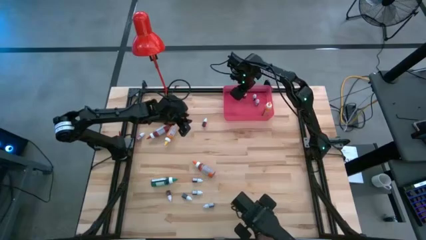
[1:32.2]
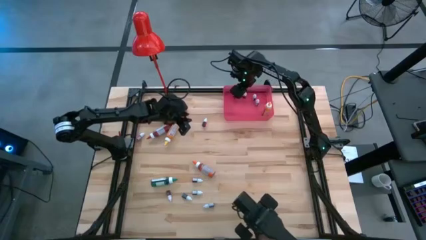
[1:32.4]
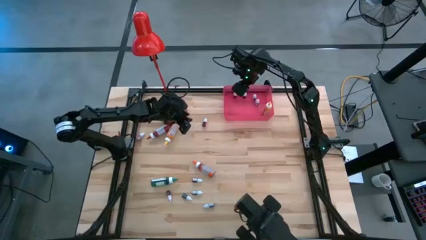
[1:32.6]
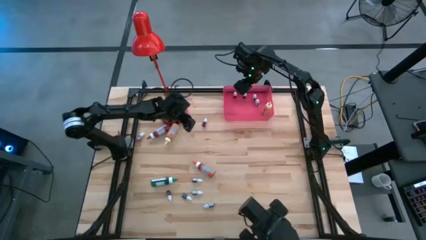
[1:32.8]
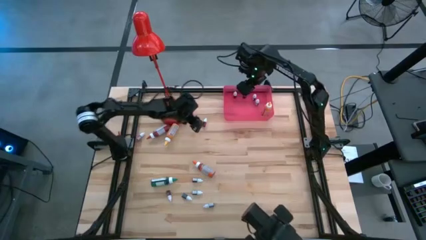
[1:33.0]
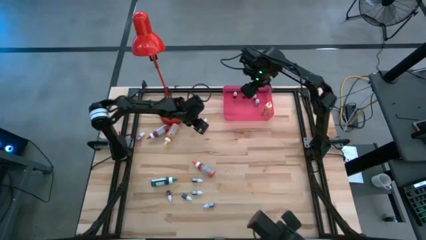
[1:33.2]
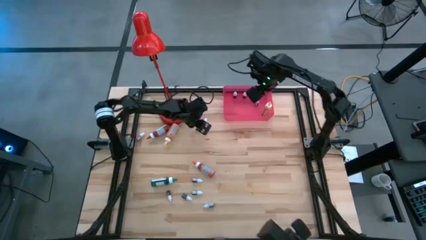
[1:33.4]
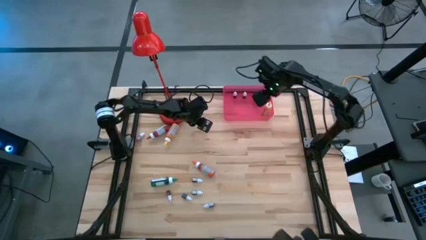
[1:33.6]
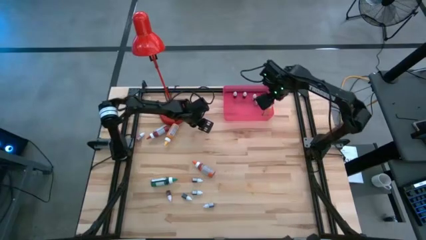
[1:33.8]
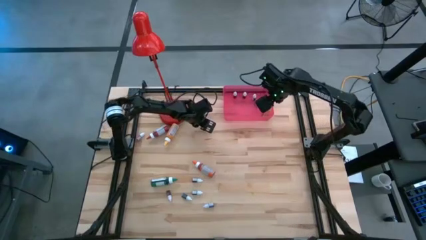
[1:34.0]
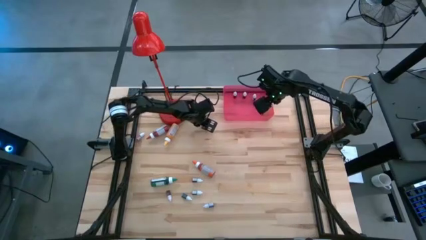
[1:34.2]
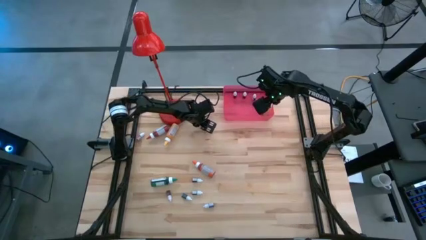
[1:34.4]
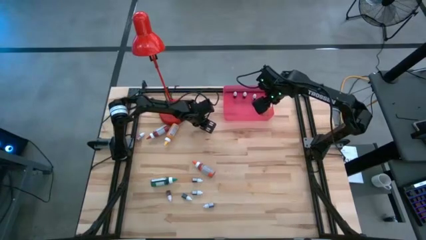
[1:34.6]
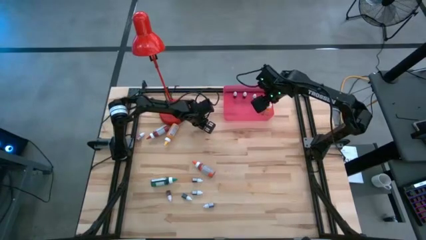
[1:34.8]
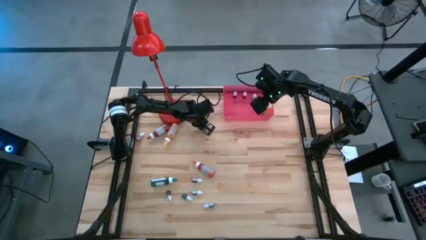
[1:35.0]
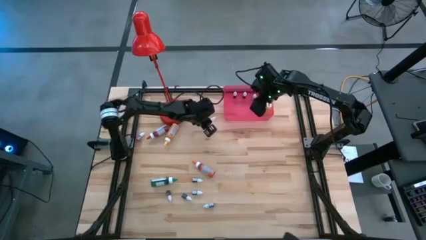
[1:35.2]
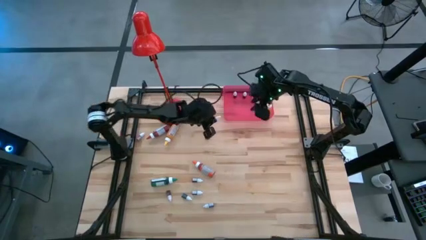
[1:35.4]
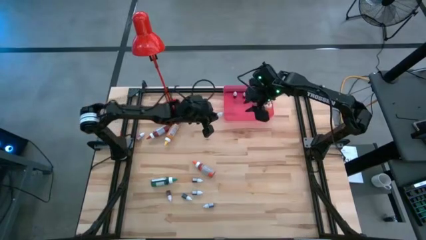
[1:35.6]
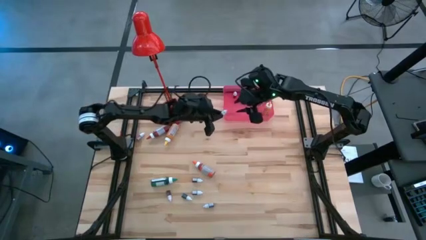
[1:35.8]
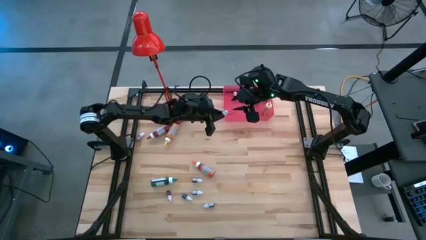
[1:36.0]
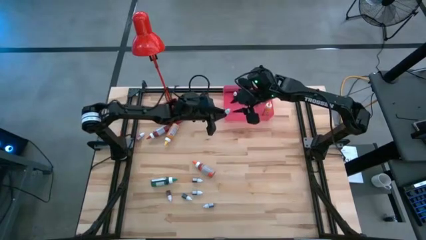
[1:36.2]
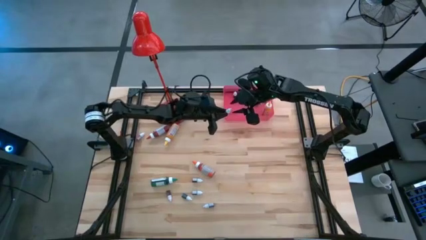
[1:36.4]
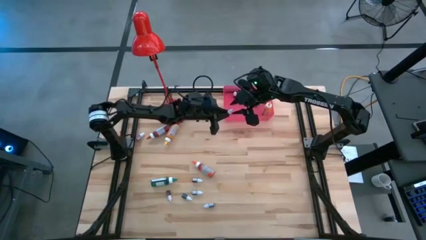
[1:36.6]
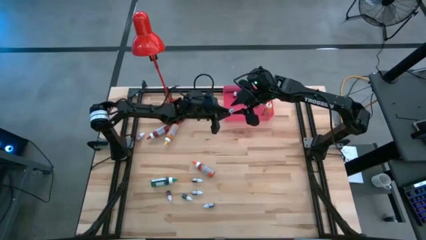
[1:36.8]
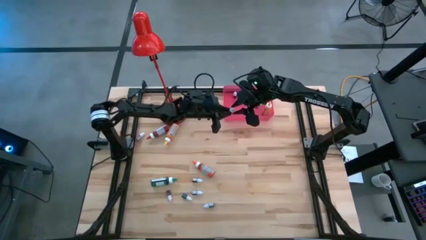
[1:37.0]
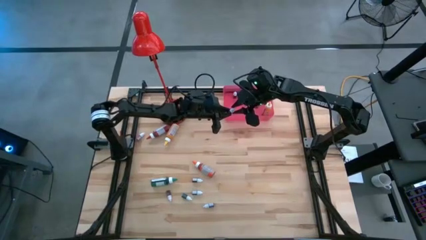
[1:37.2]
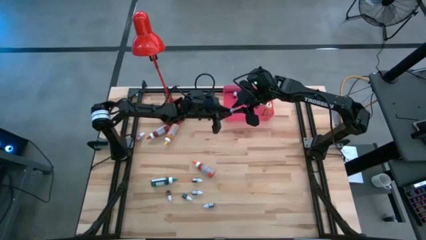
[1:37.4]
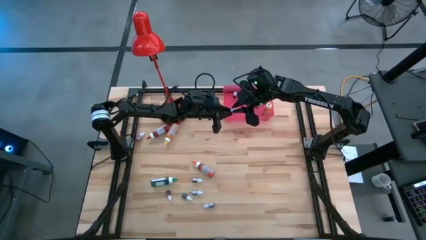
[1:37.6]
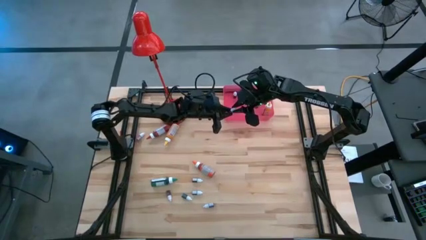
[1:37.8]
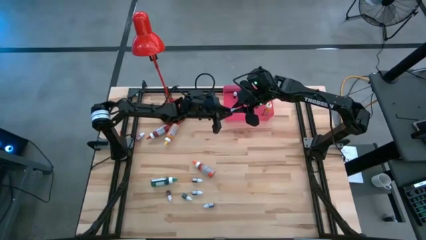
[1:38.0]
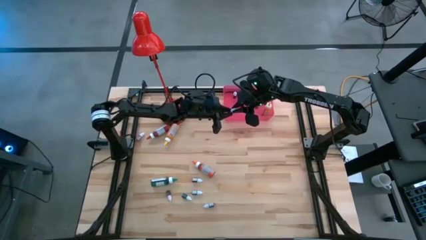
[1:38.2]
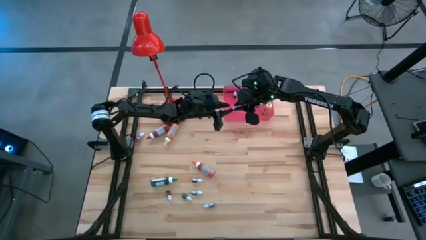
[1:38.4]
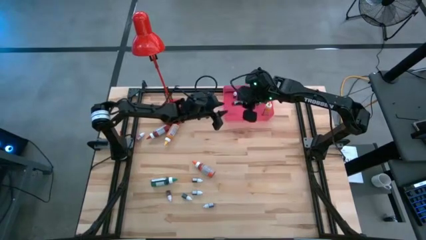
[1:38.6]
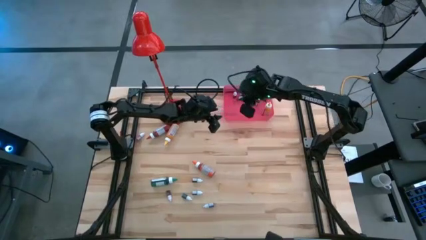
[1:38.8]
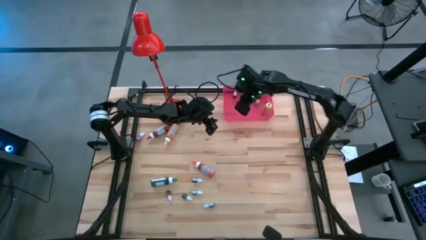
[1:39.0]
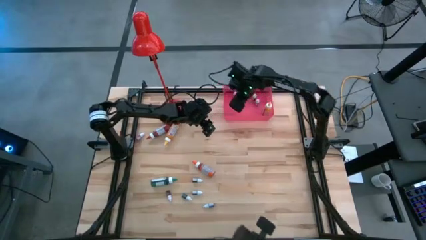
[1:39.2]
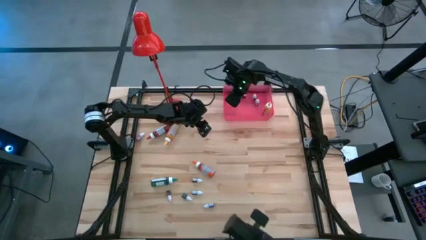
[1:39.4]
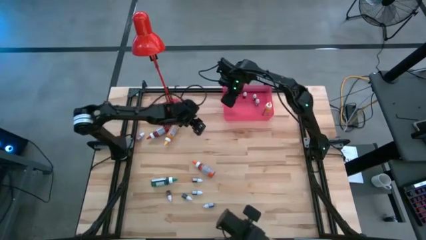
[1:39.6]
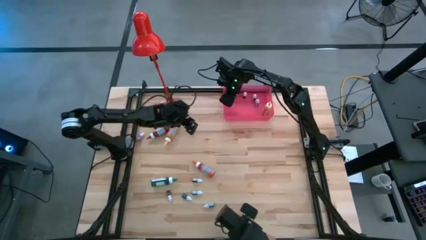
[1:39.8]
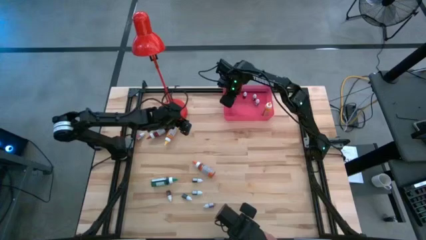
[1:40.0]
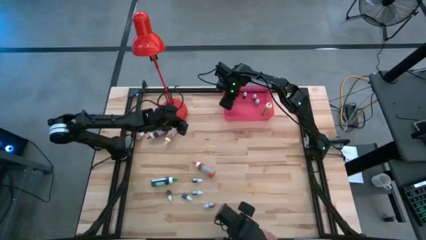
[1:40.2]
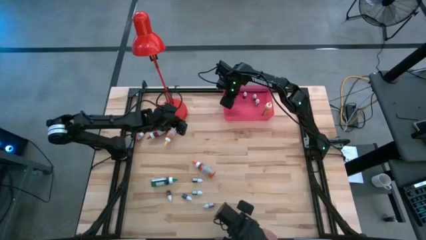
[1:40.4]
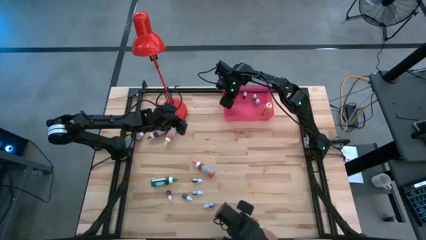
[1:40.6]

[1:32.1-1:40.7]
Task: Pick & Place food coloring
Put the small red food coloring bottle into the red bin

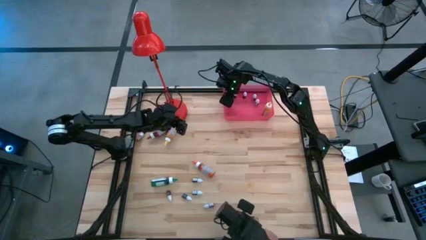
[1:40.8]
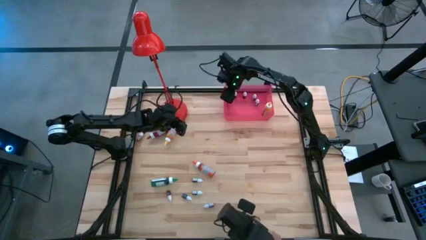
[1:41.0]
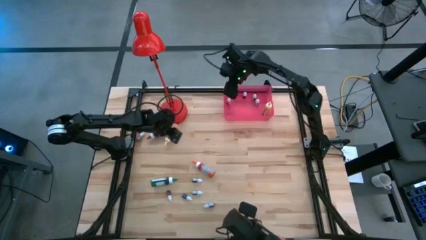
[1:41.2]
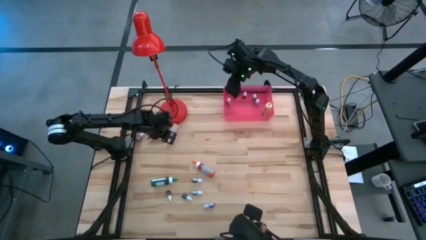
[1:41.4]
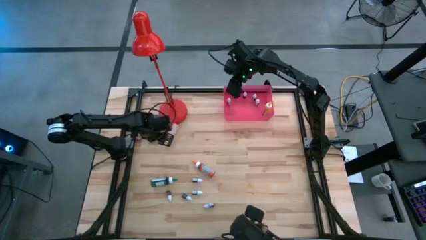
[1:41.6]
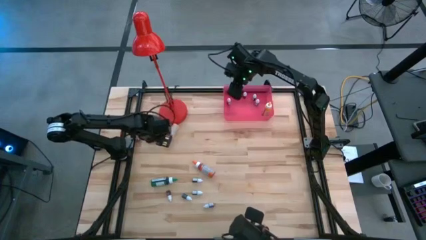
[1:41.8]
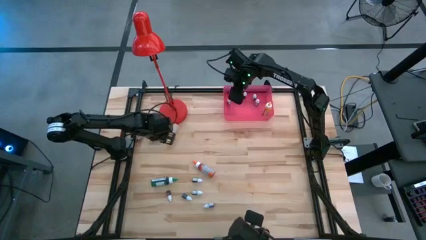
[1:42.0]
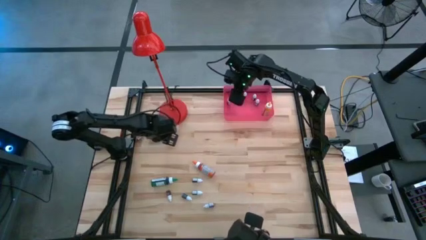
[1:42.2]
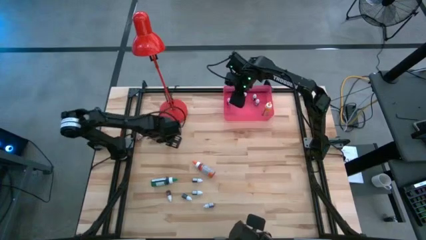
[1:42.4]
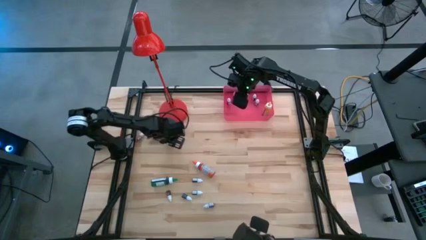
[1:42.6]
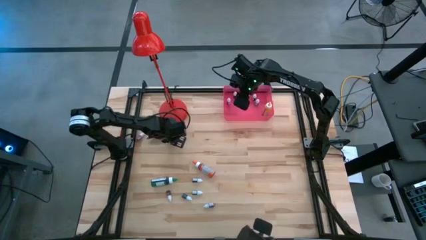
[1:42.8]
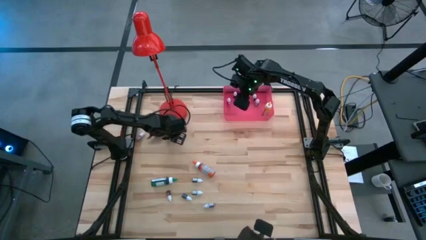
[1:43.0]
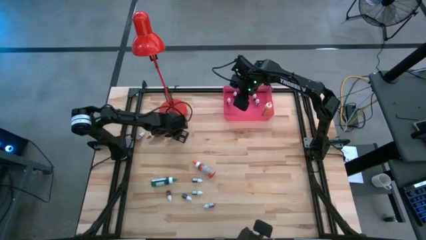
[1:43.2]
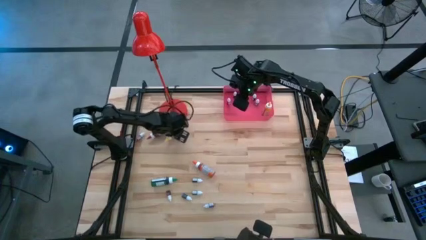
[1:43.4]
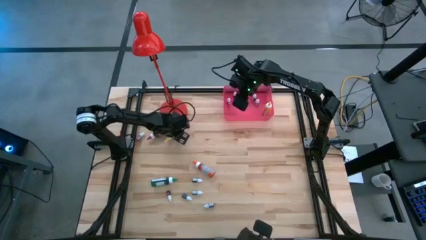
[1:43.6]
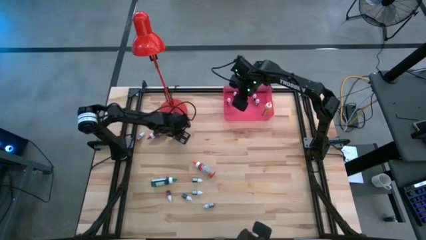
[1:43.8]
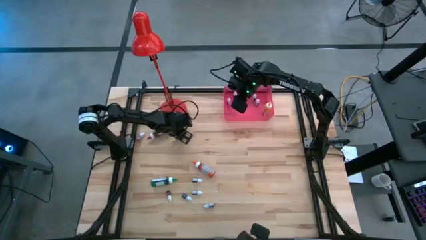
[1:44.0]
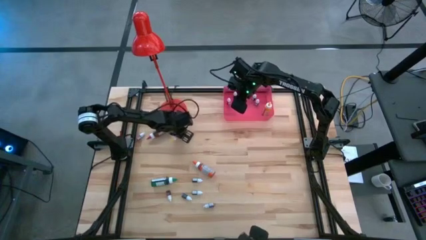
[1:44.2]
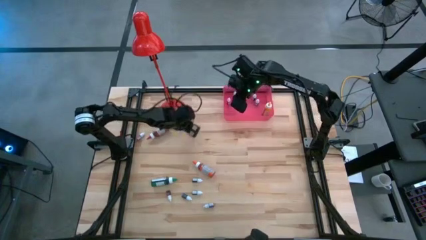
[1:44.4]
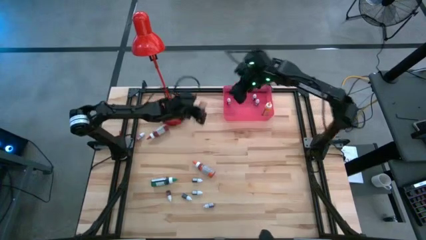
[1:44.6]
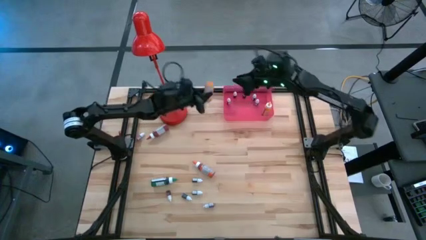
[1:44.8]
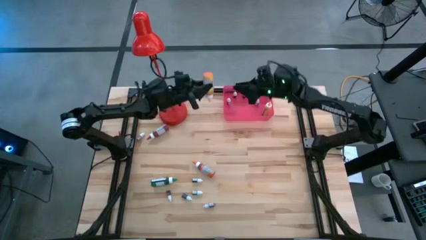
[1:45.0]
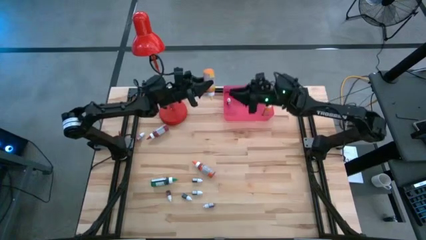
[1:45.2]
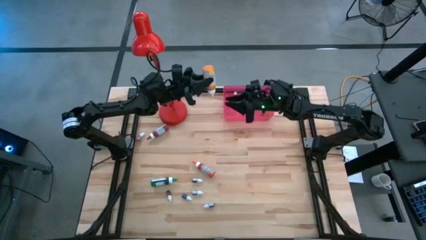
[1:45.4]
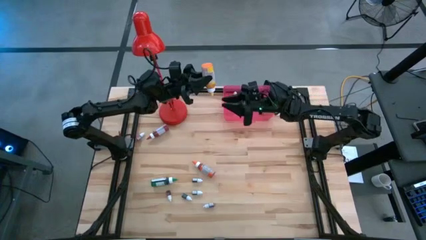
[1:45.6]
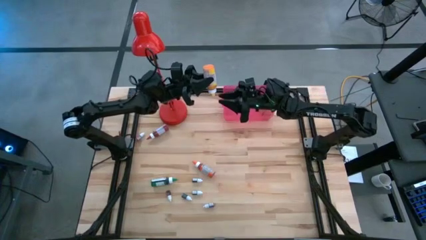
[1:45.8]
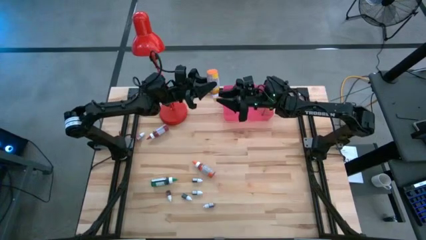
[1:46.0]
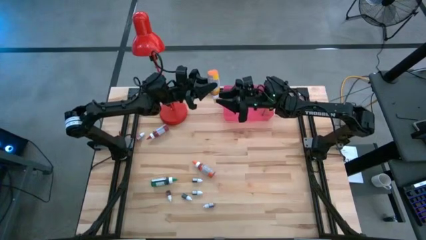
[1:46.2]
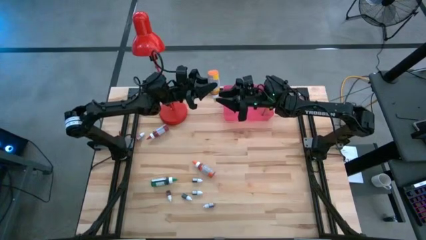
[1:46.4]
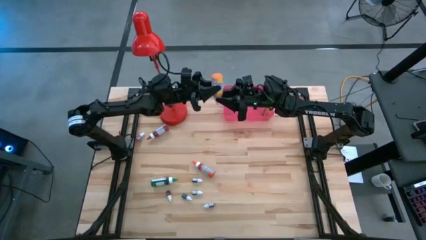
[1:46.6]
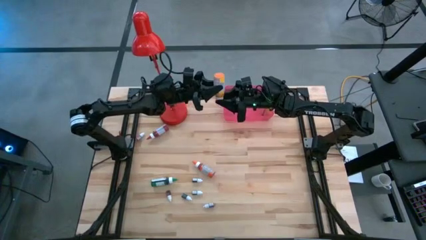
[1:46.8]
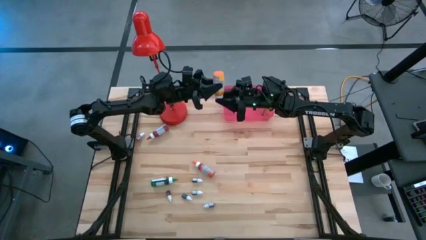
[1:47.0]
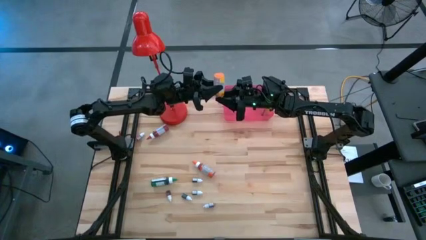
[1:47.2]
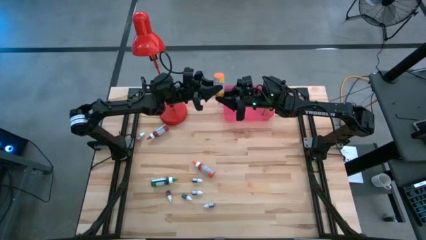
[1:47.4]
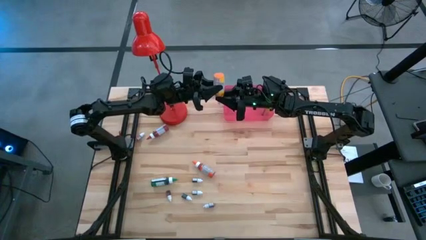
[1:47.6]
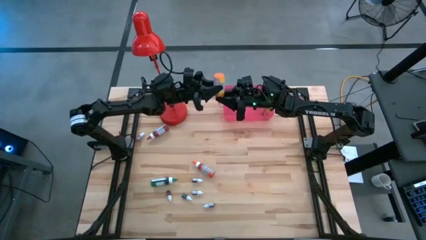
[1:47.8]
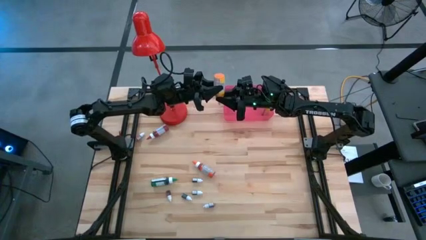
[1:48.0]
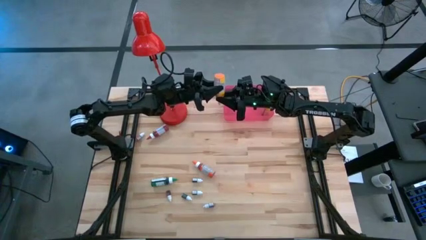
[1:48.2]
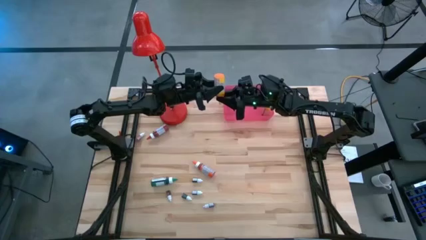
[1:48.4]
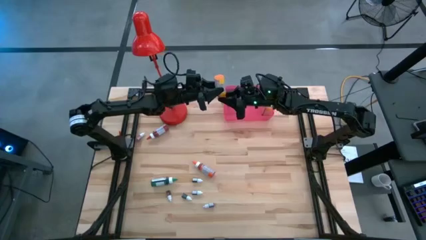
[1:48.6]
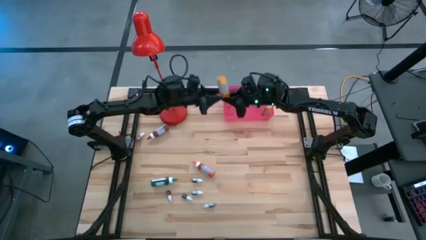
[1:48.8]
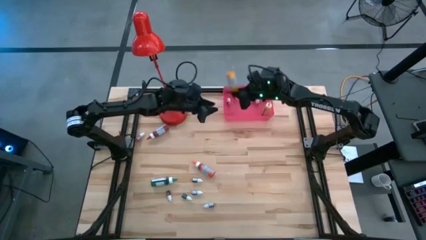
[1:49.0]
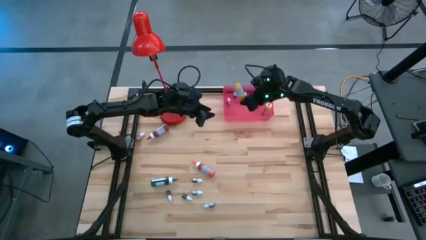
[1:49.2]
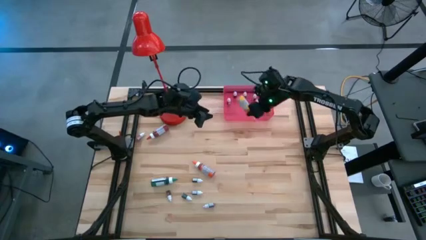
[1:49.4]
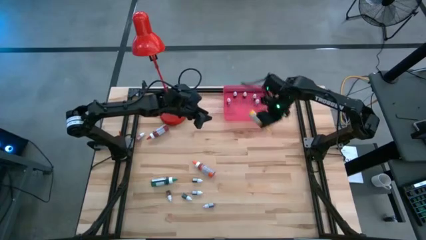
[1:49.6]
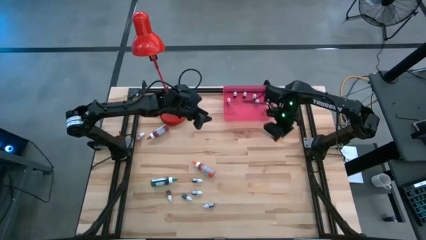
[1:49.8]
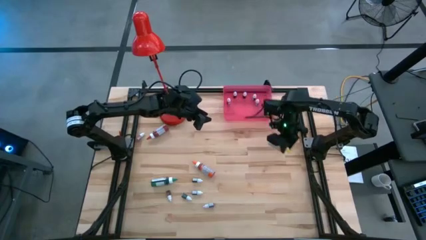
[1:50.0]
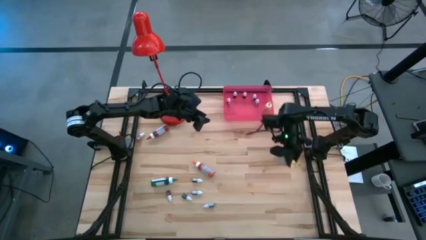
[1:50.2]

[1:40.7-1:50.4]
Put the large yellow food coloring bottle into the red bin
